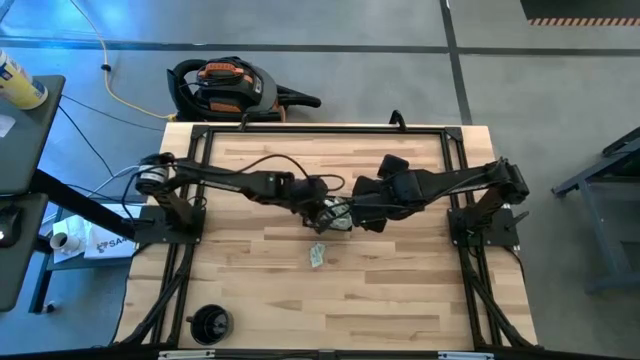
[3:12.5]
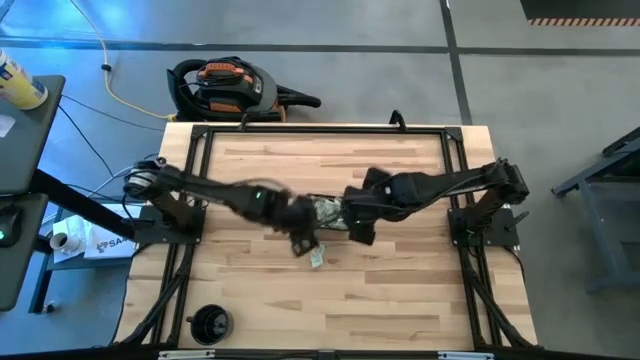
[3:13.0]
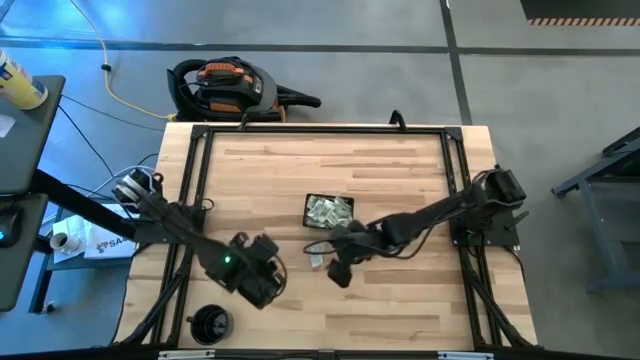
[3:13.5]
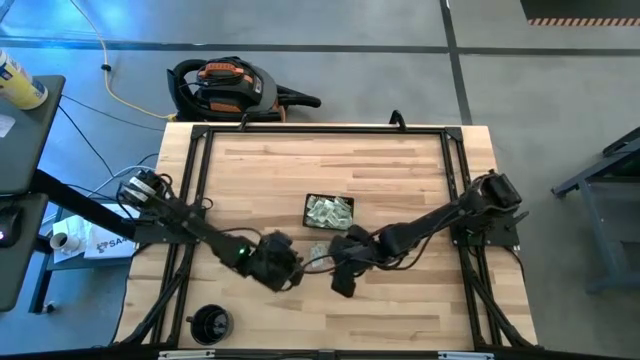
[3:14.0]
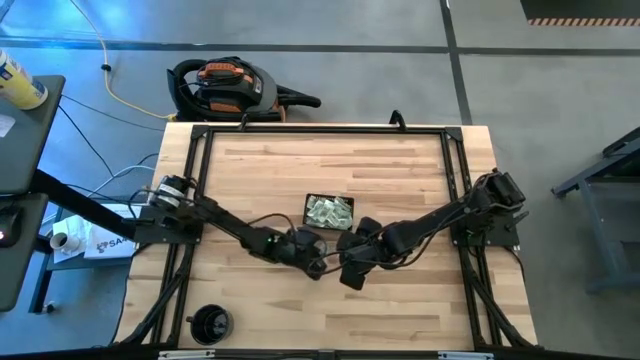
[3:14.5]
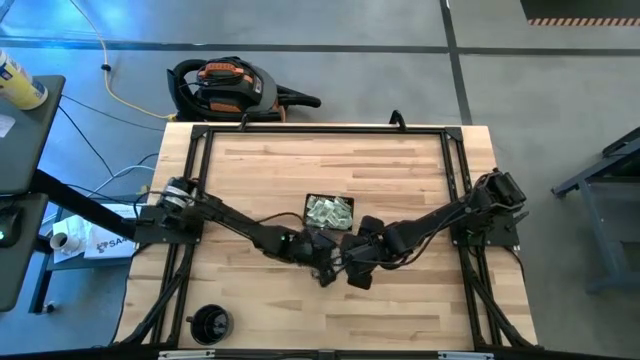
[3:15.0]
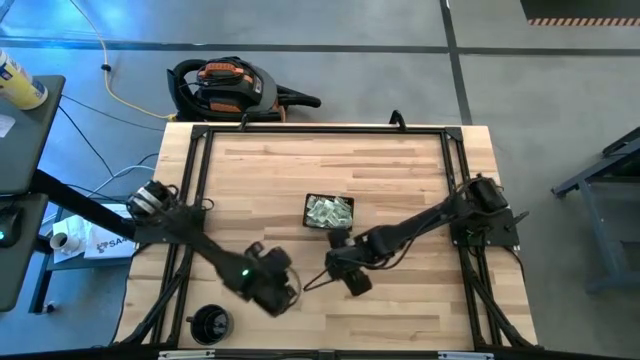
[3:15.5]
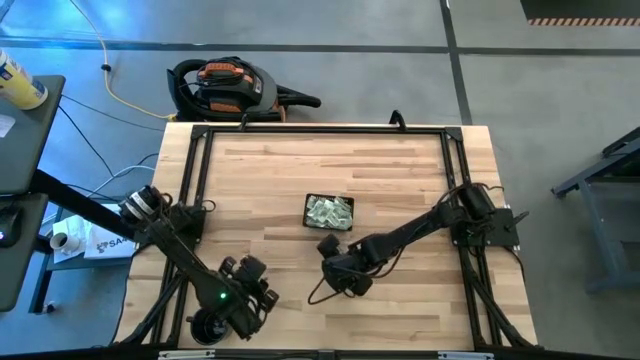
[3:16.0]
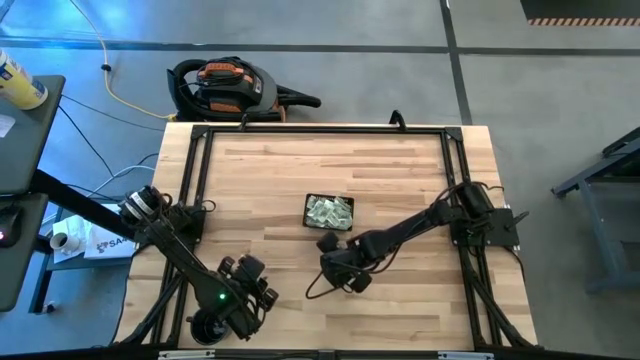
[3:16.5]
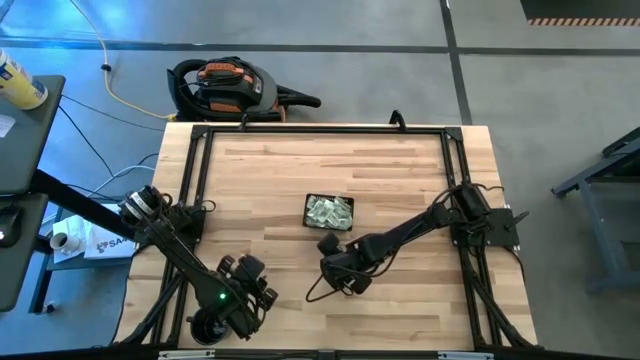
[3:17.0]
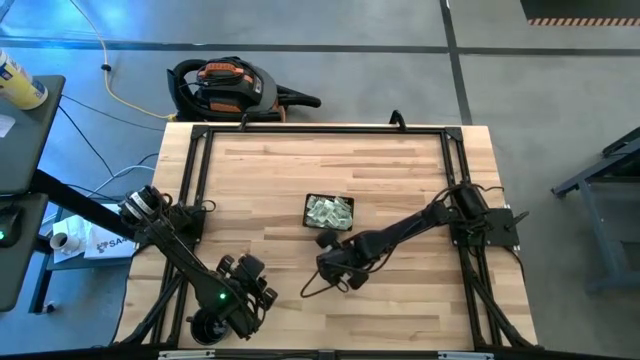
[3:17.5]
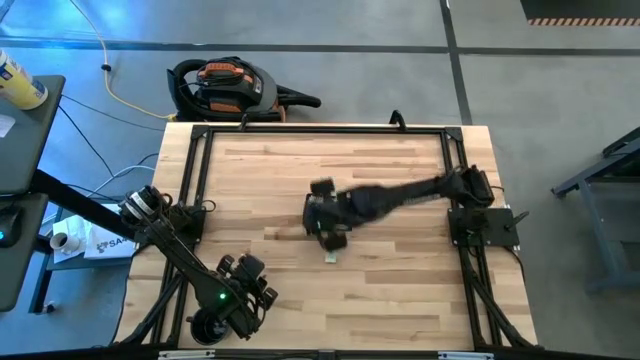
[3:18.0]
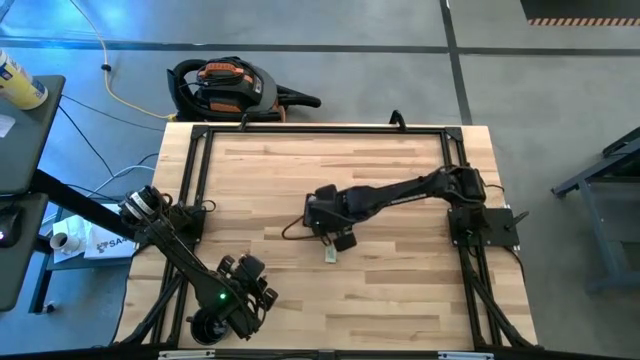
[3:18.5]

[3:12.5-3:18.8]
Task: Pick and place Stevia / Truvia into bins
Put the green stevia packet into the black basket

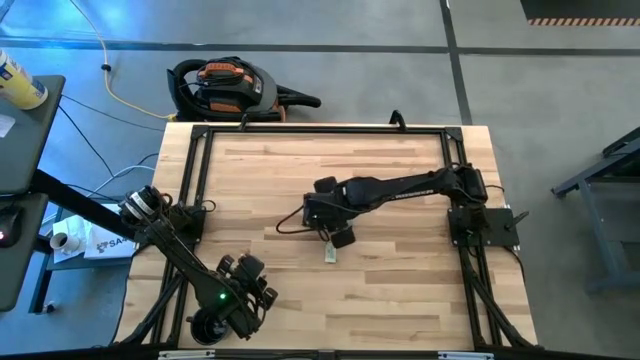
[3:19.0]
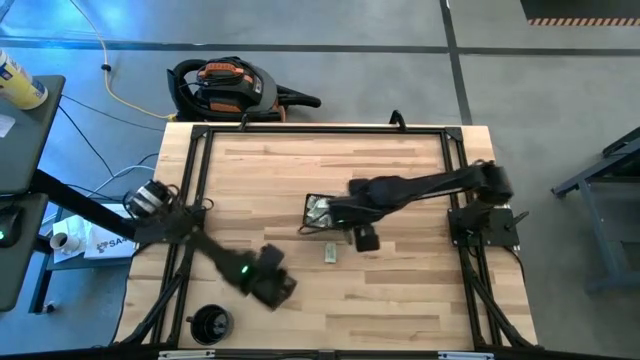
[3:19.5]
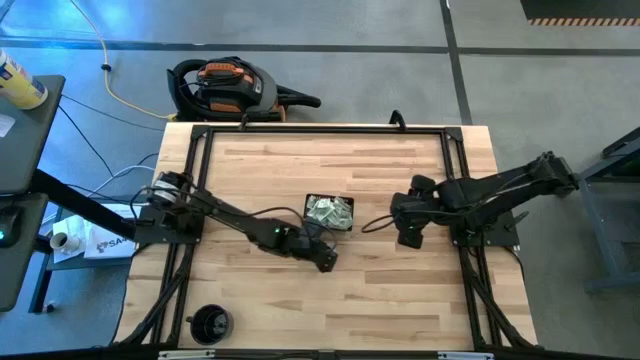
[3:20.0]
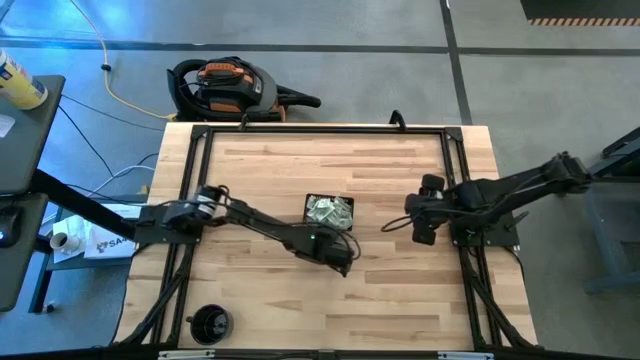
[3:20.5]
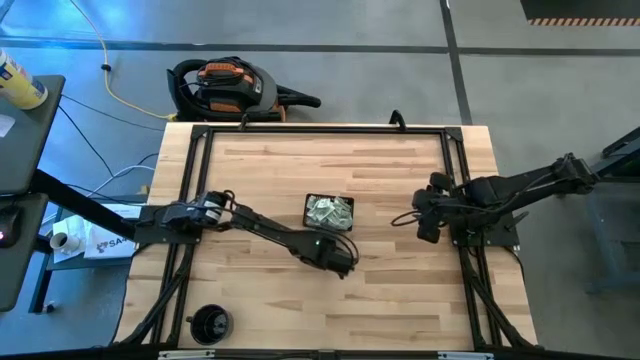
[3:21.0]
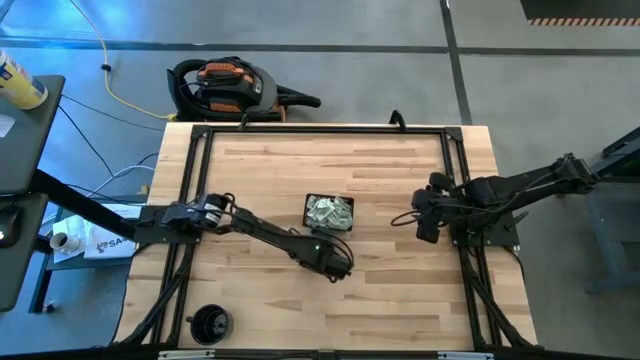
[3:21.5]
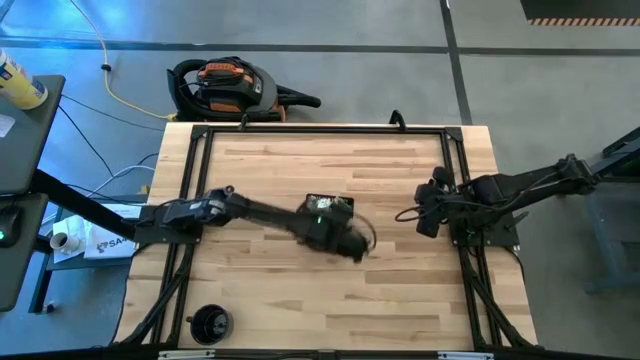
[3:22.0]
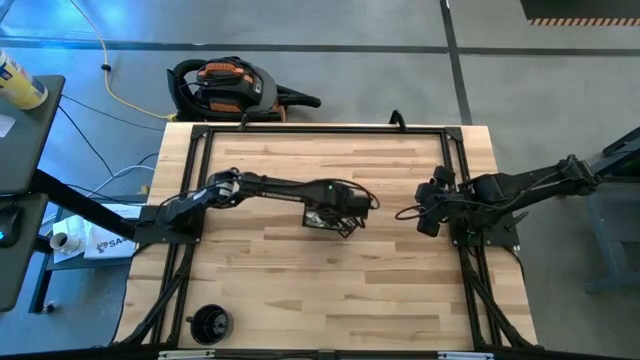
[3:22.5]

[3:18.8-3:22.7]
Put the green stevia packet into the black basket

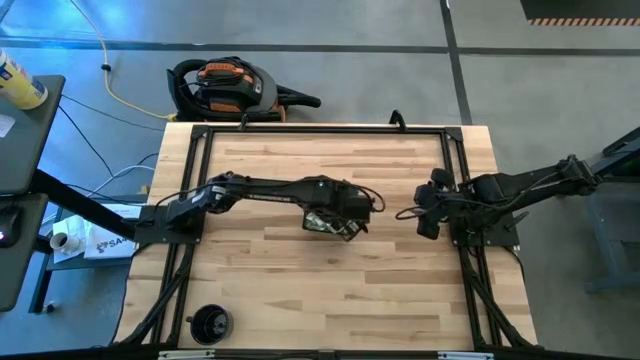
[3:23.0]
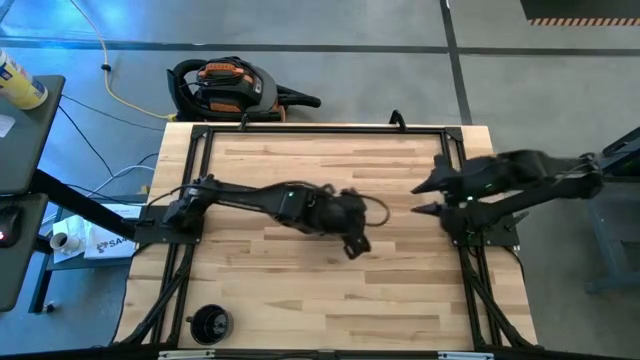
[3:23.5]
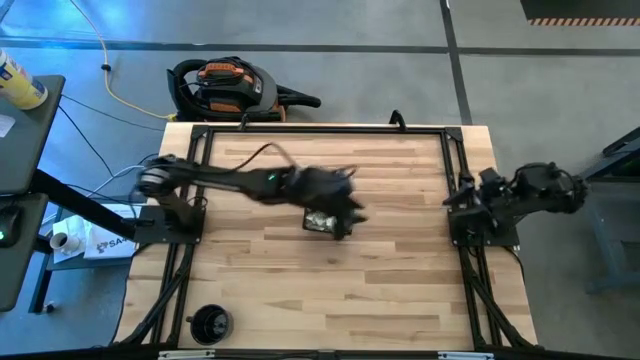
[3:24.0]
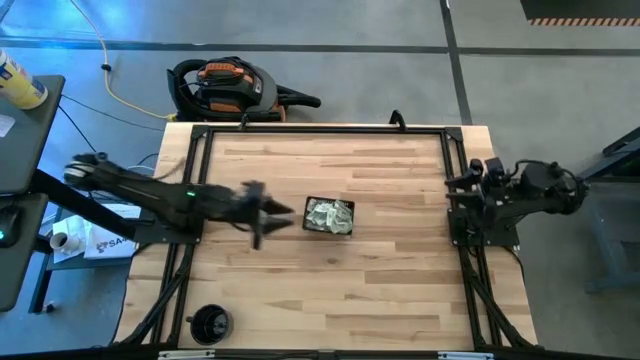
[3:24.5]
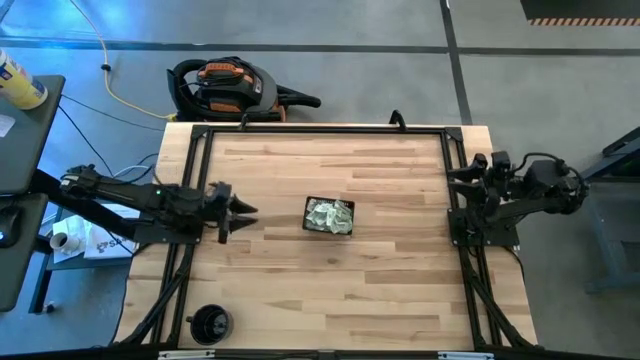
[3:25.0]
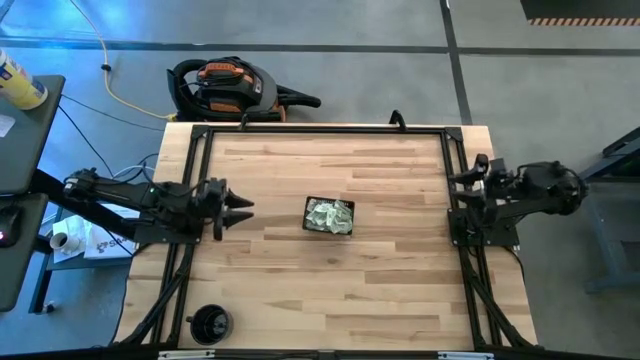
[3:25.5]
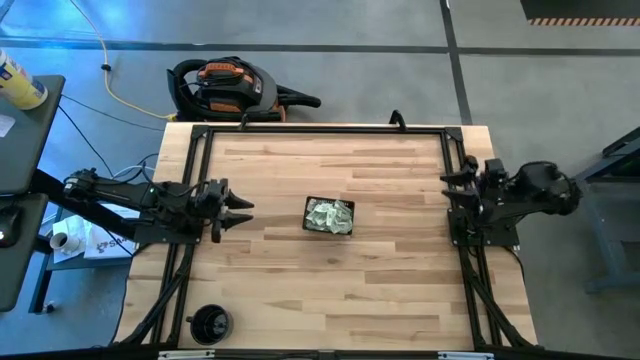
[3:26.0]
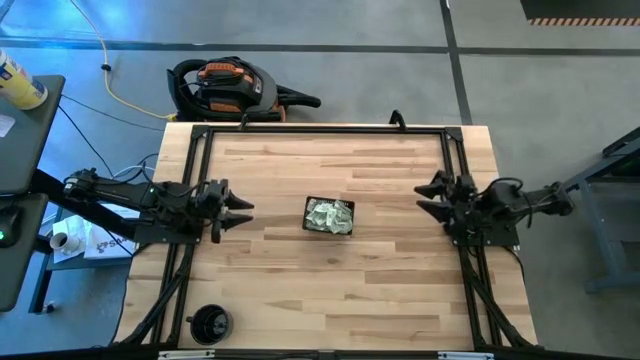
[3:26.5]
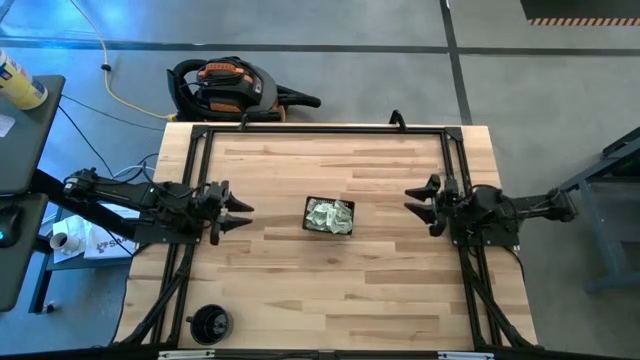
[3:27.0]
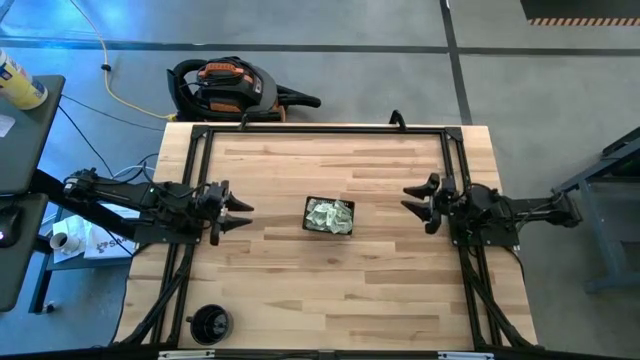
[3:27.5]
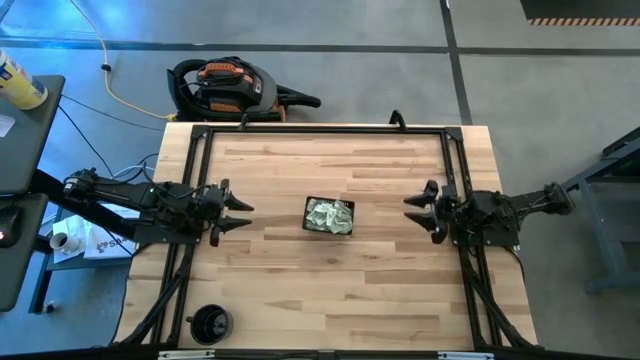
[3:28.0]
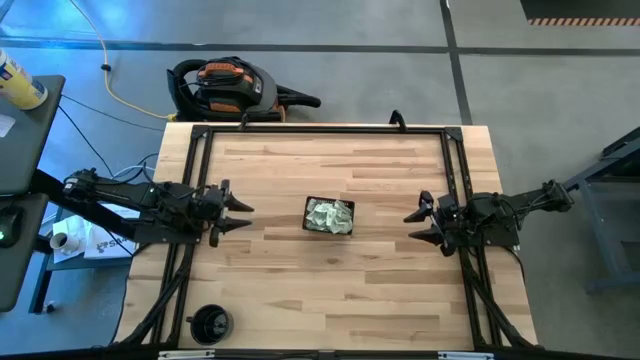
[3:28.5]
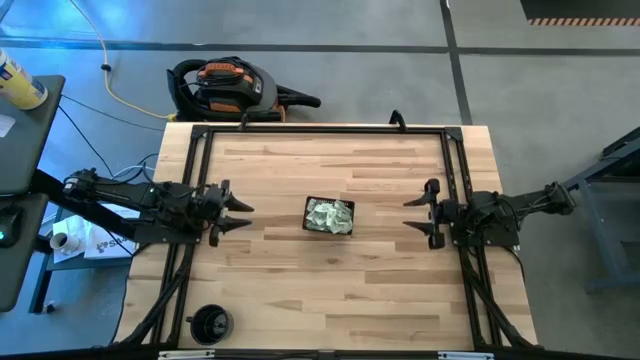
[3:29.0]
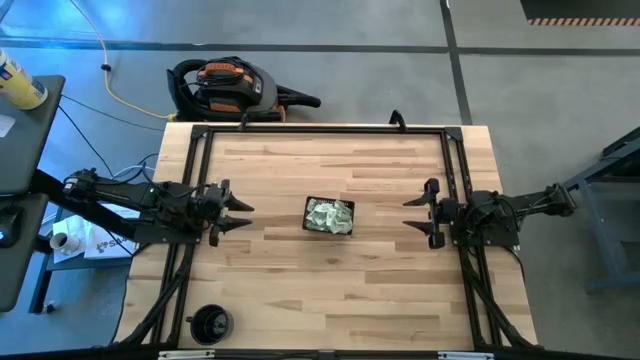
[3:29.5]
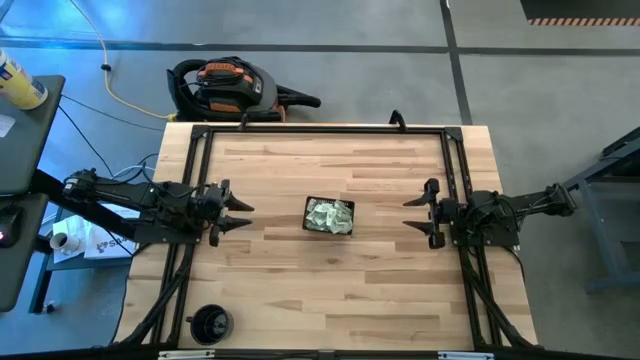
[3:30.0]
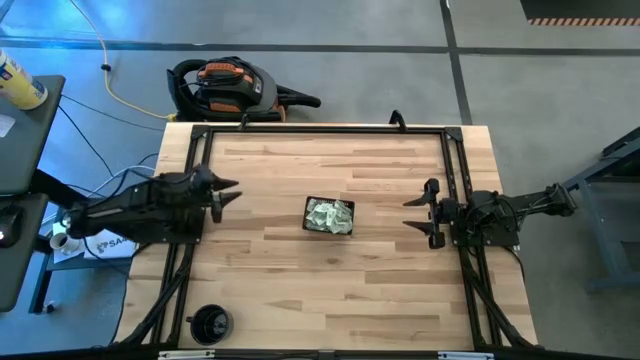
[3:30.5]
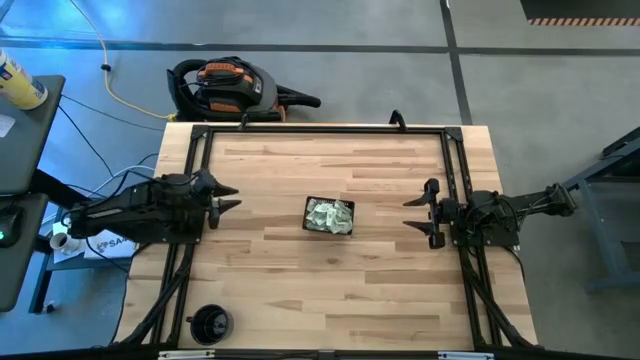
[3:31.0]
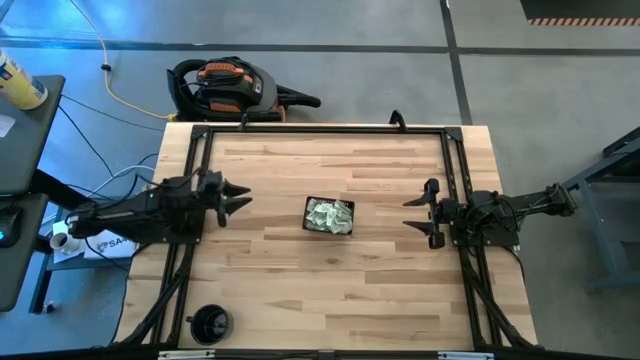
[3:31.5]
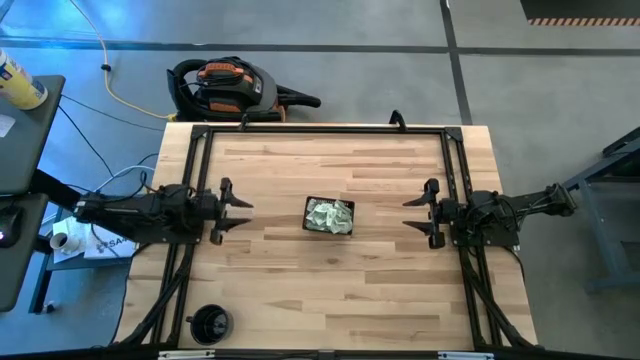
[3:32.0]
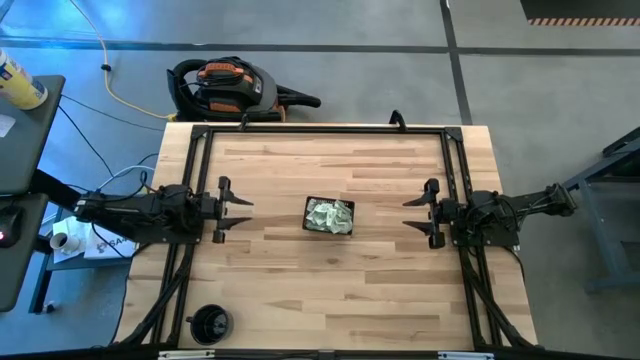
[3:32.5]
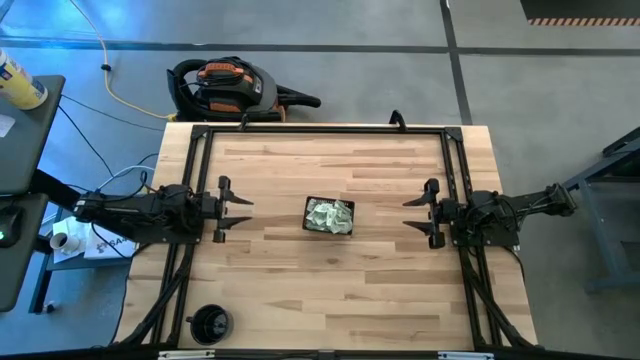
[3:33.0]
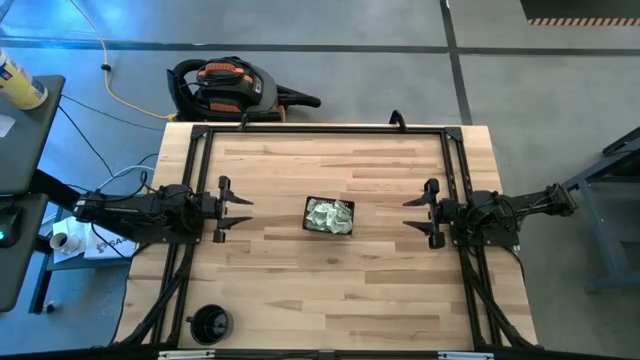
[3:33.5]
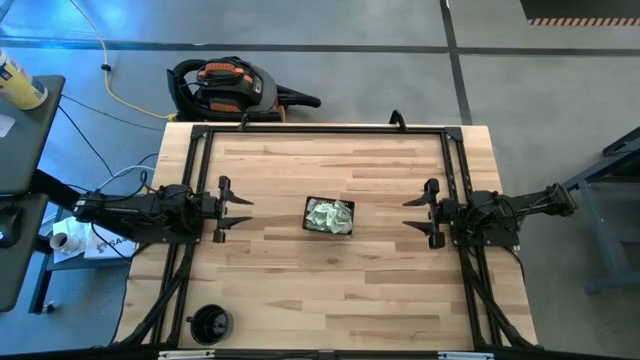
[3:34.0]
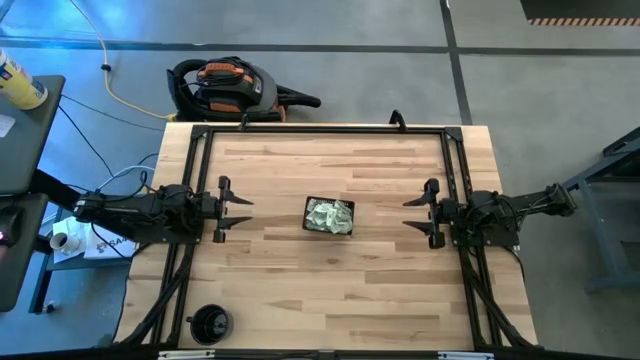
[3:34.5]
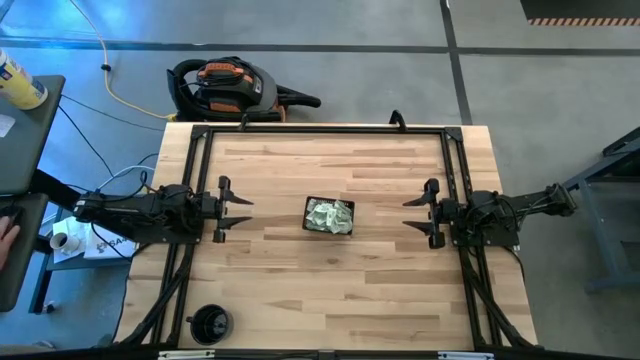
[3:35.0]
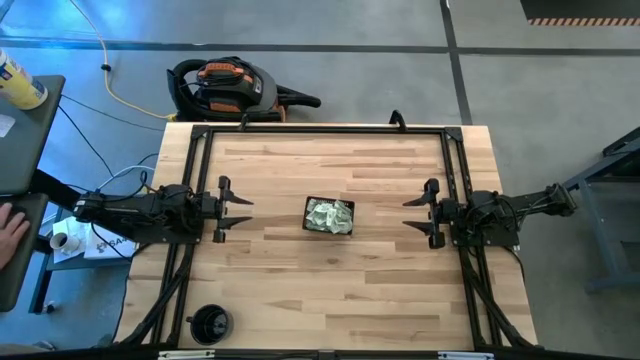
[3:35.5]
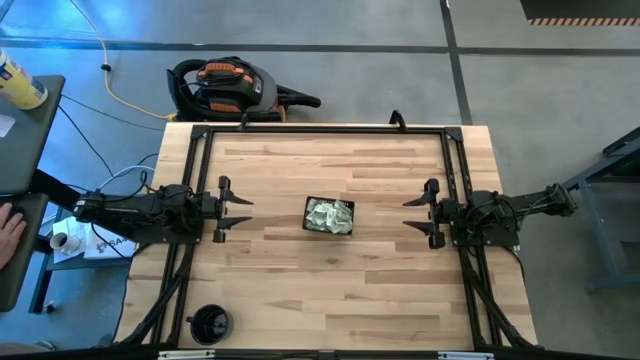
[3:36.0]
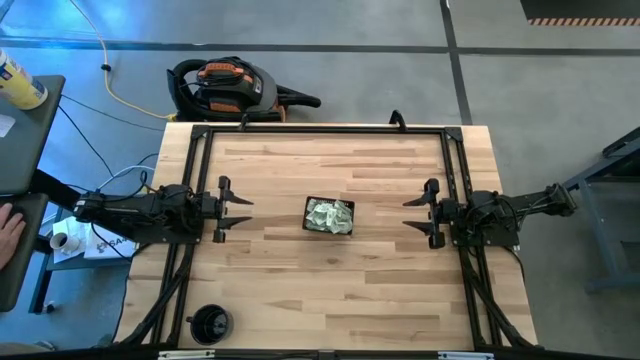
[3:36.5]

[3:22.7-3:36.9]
Return to Home Position
